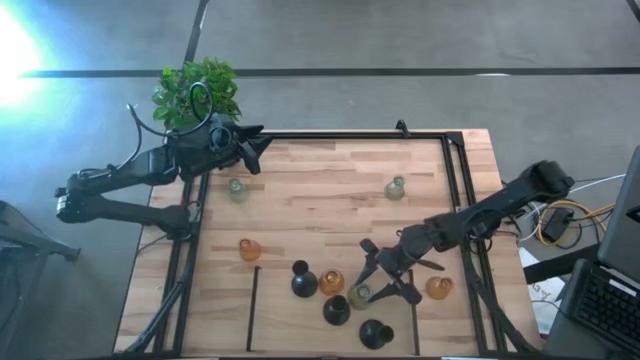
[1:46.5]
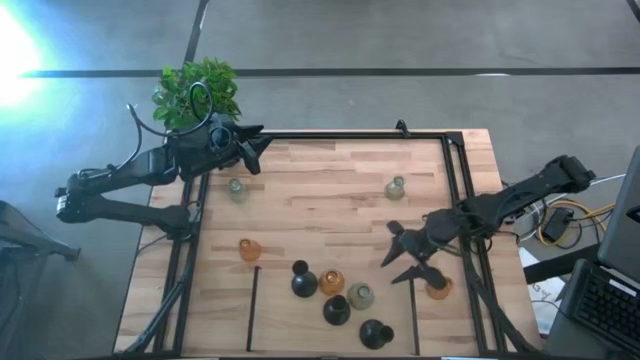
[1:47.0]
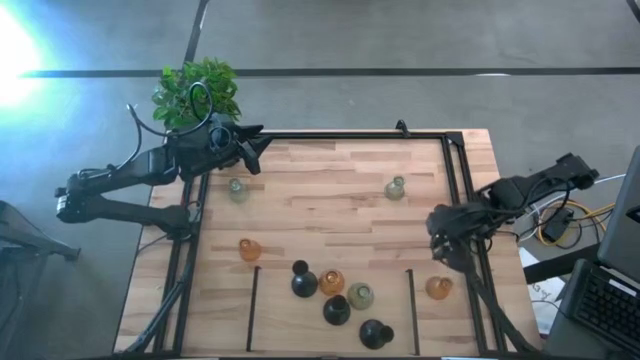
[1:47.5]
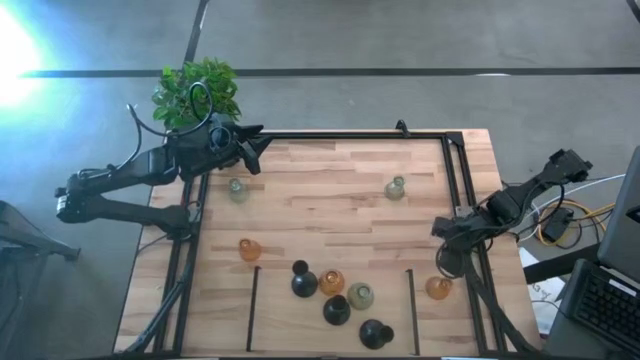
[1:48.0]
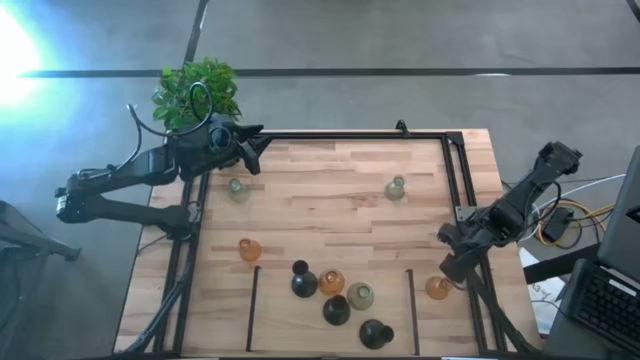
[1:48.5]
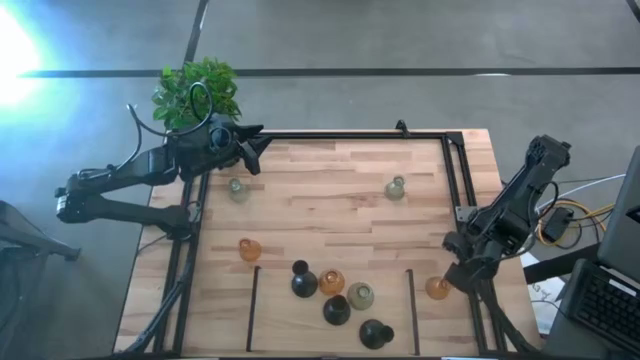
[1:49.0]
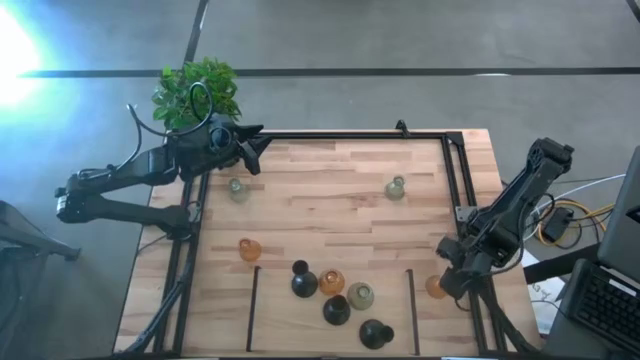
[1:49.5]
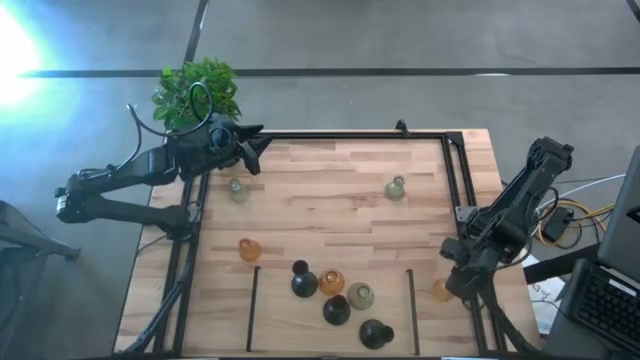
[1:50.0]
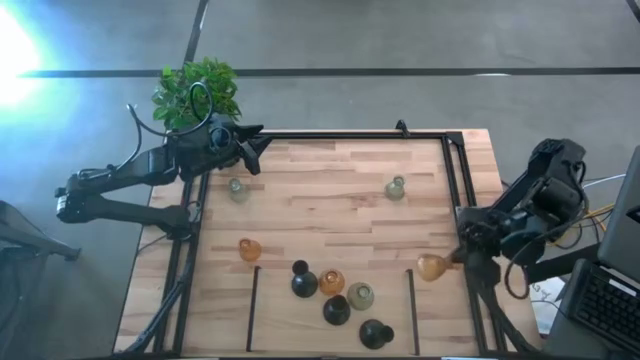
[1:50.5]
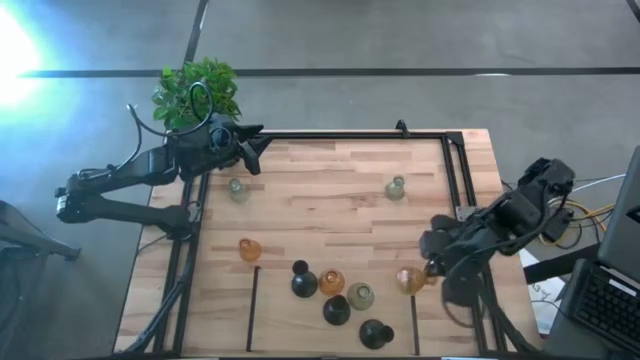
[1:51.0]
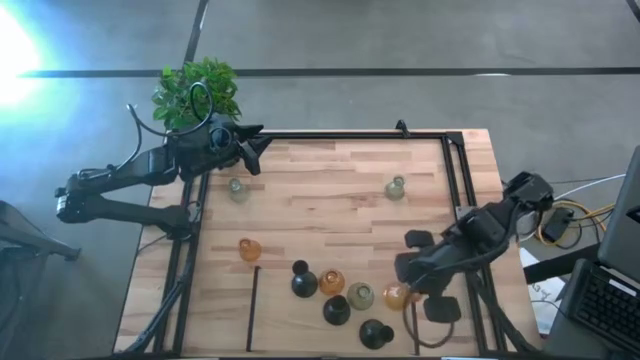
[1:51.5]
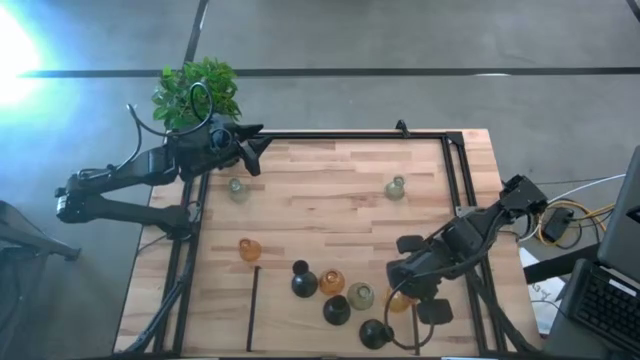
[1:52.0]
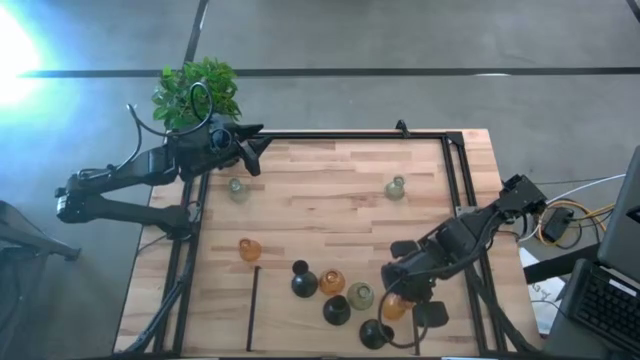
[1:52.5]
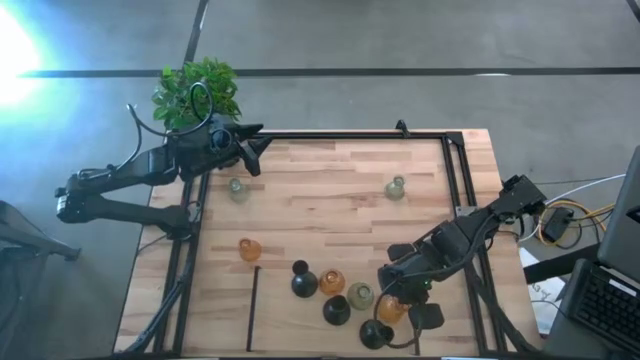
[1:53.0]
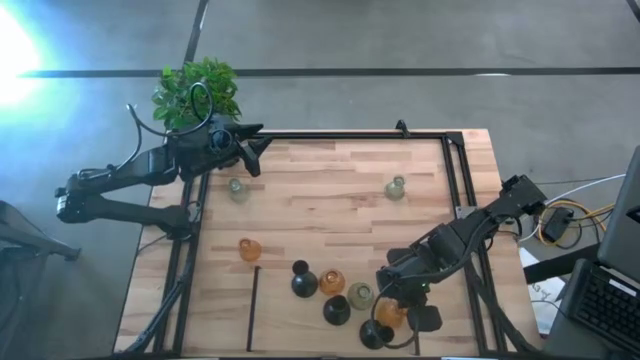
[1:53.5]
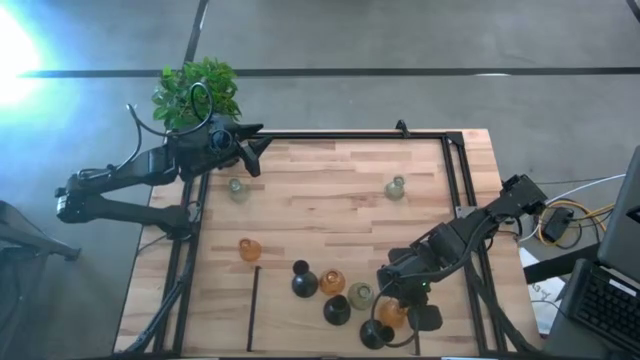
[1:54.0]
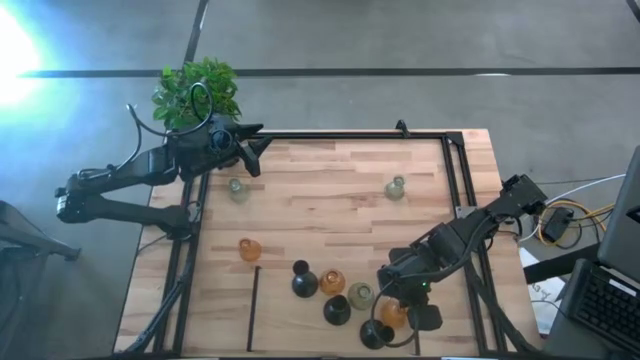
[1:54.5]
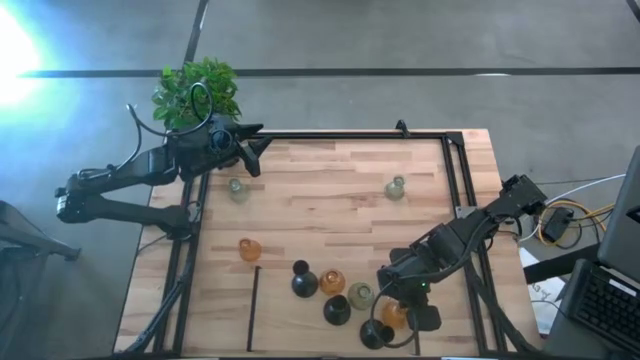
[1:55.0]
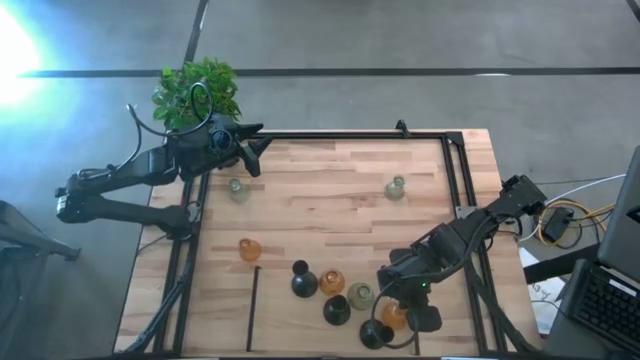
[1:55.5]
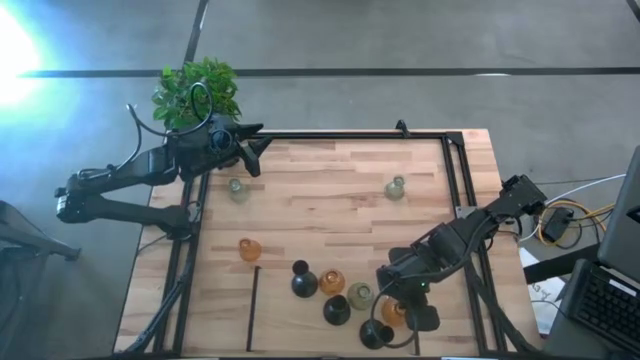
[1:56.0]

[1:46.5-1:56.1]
Task: Pick & Place candle stick holders
Put the right orange glass candle holder on the shelf

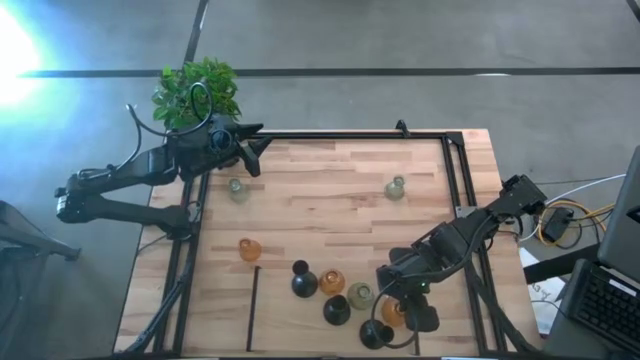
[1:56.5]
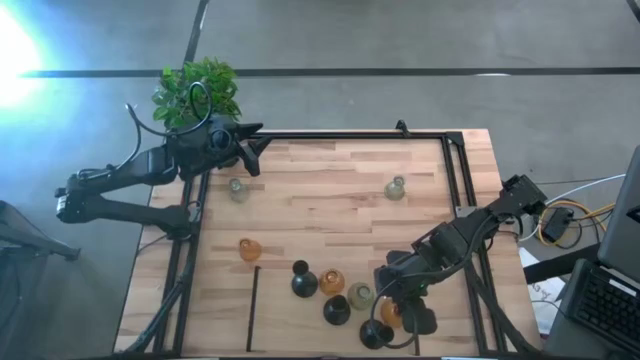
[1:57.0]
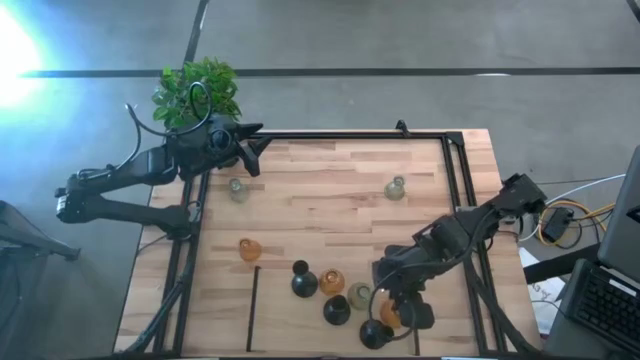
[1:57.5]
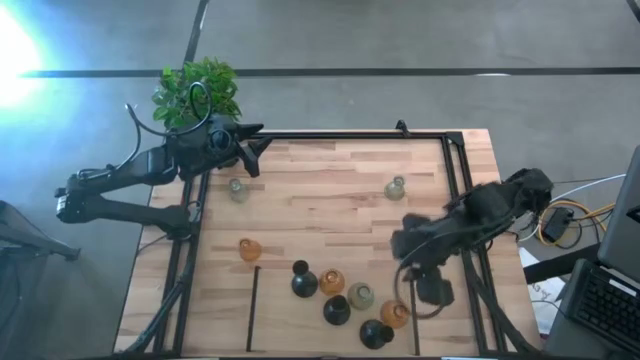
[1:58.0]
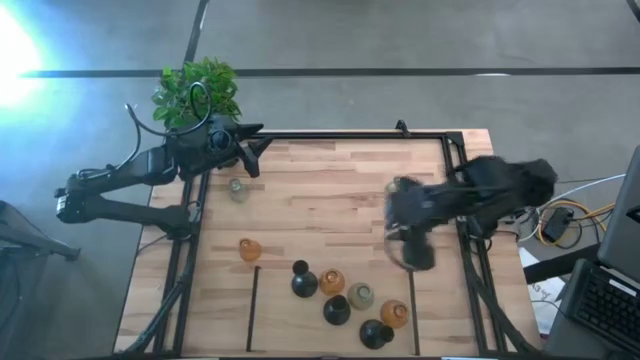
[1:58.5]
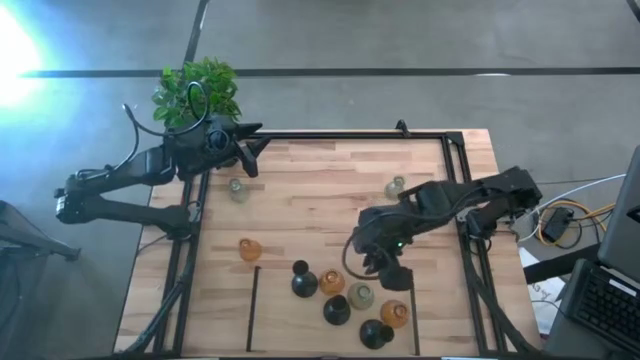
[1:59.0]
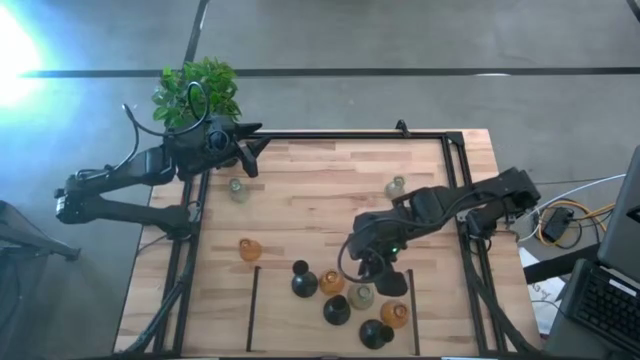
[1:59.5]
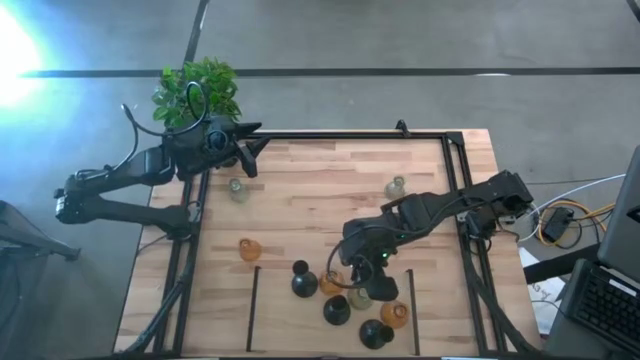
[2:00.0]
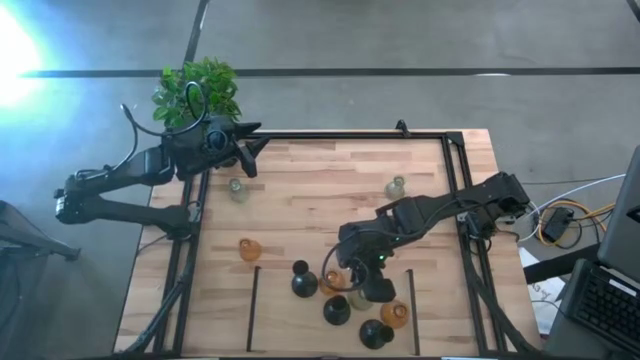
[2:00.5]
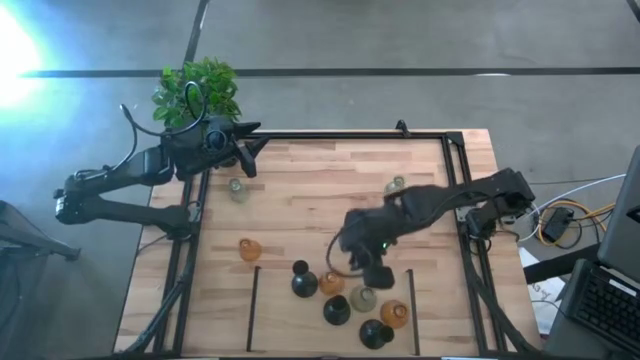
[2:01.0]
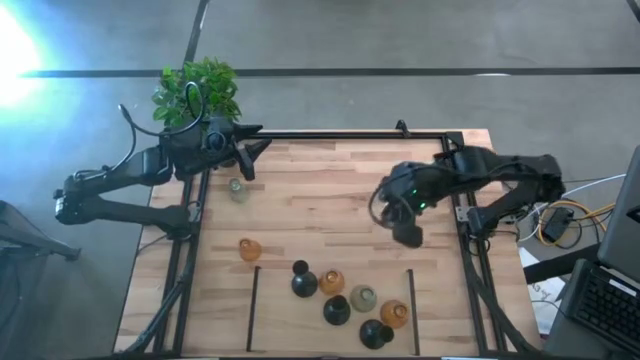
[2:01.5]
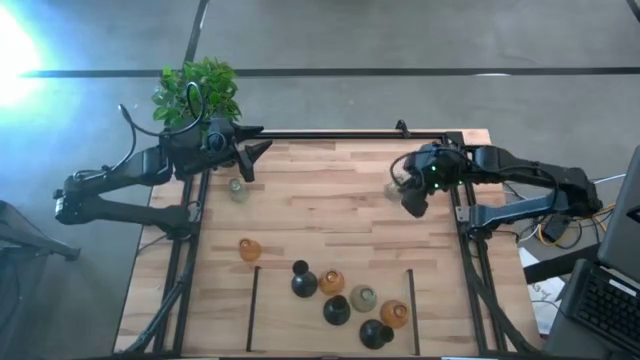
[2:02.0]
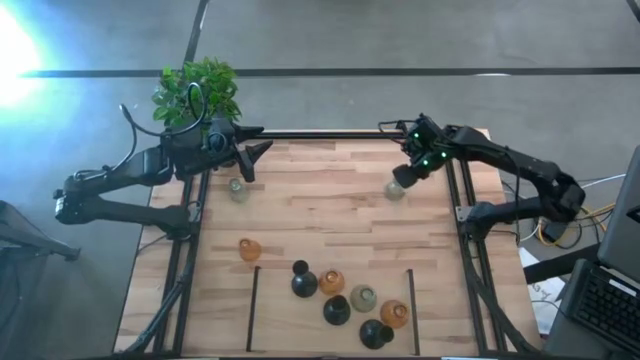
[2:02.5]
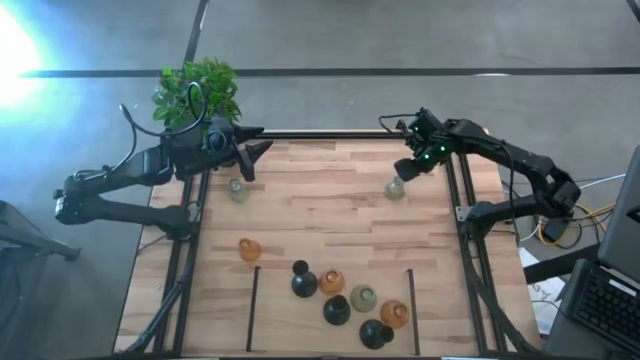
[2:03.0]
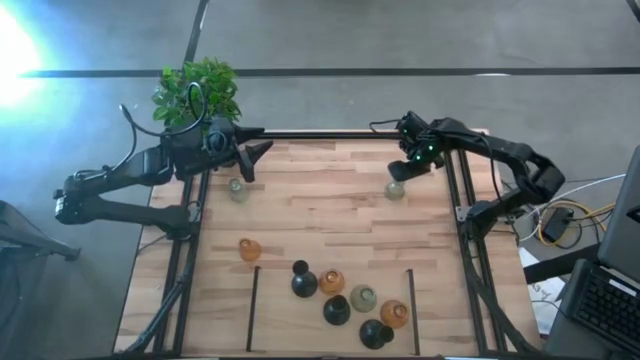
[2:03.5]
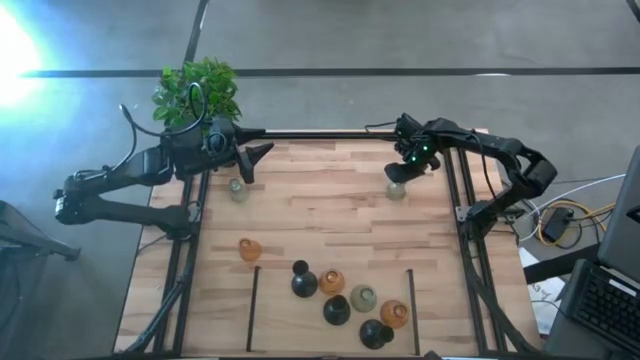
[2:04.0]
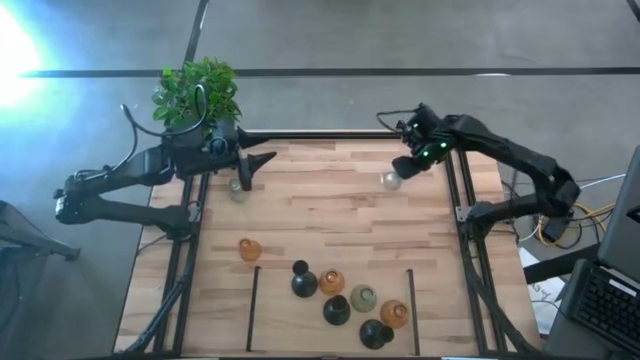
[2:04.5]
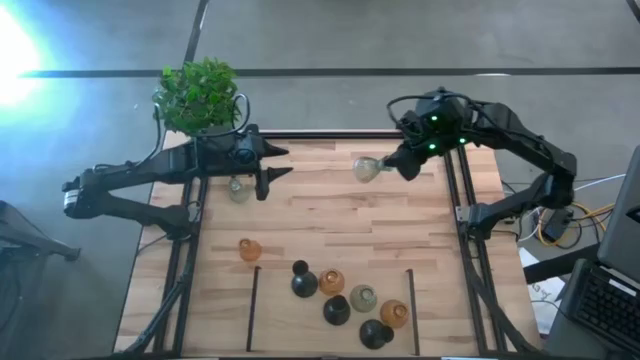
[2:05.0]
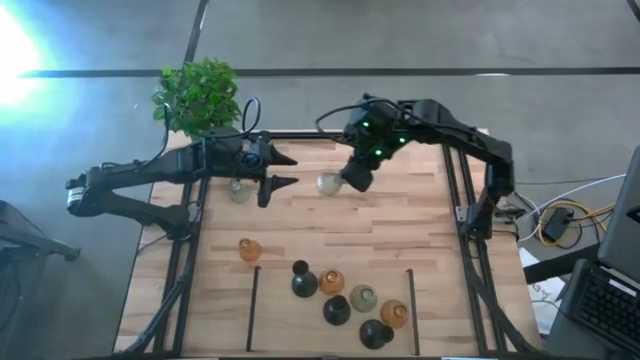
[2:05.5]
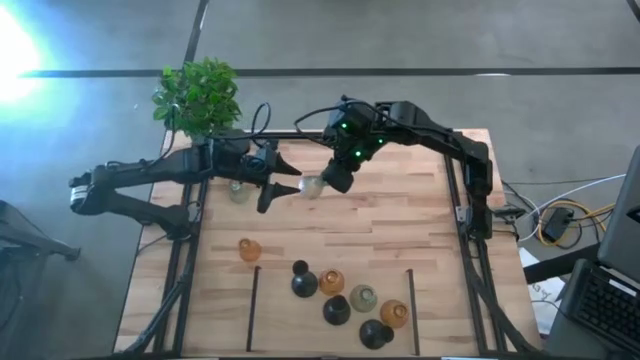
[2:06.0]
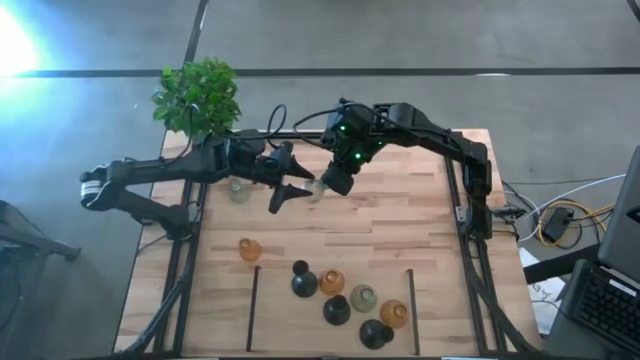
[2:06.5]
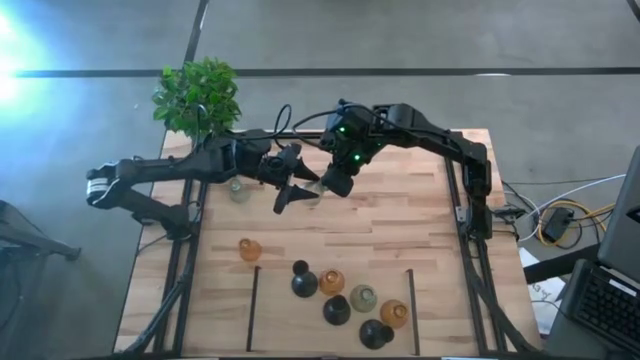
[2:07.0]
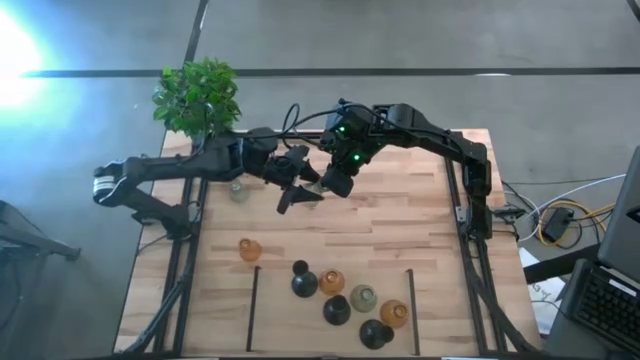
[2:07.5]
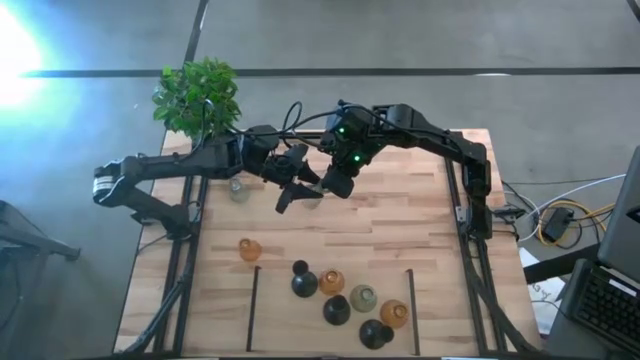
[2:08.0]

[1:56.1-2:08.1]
Put the right transparent glass candle holder on the shelf
